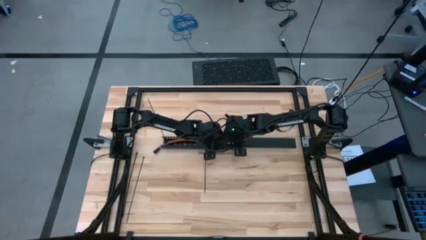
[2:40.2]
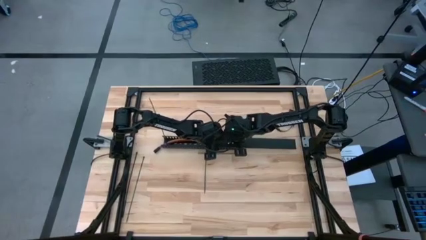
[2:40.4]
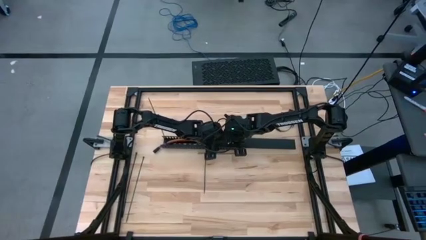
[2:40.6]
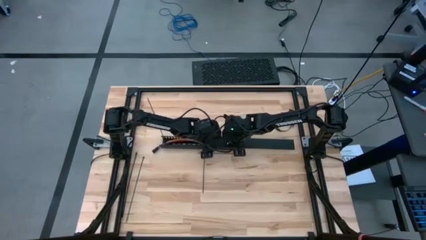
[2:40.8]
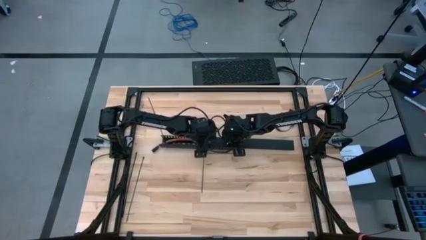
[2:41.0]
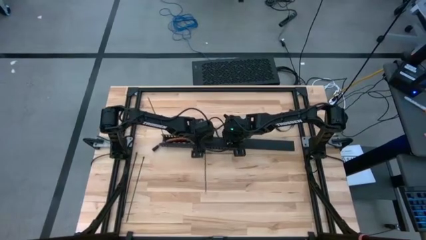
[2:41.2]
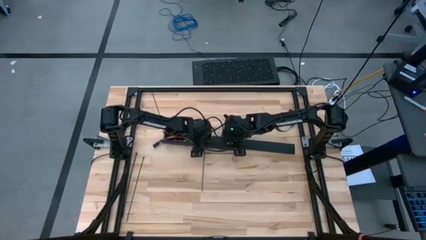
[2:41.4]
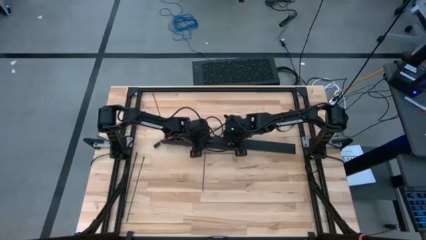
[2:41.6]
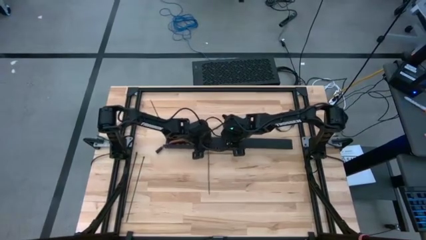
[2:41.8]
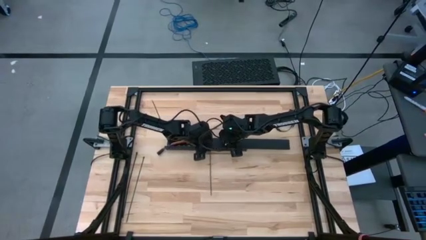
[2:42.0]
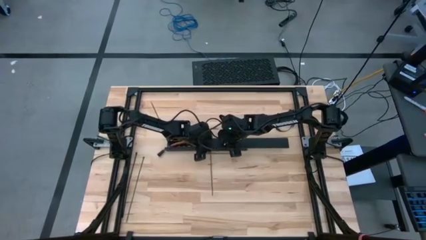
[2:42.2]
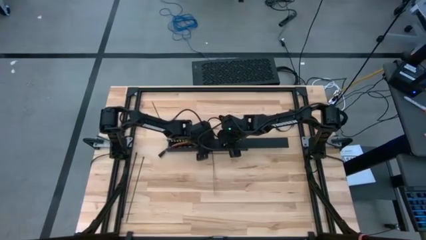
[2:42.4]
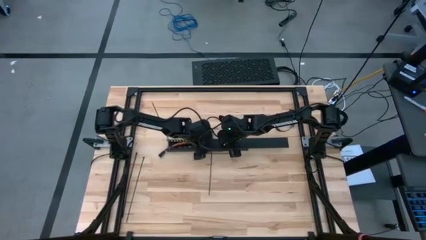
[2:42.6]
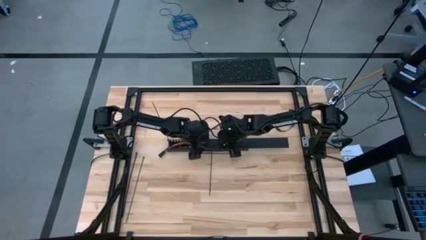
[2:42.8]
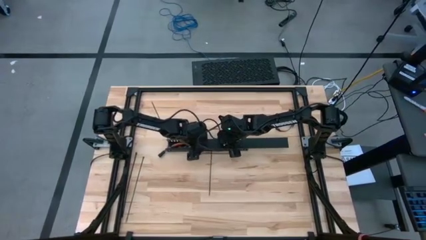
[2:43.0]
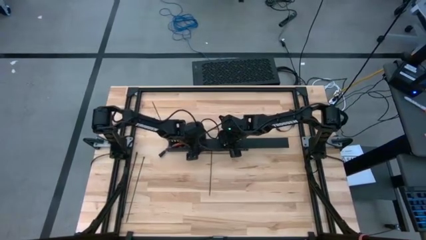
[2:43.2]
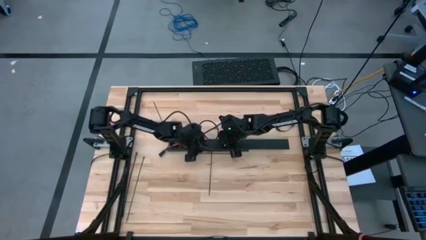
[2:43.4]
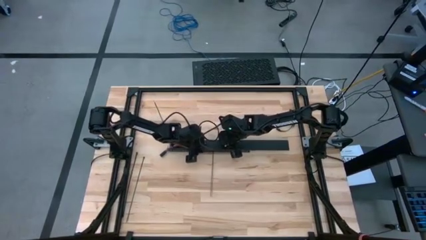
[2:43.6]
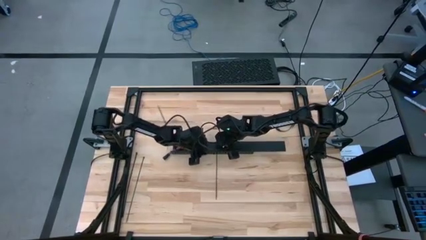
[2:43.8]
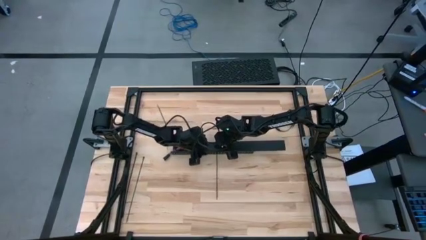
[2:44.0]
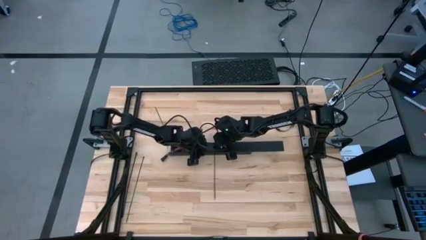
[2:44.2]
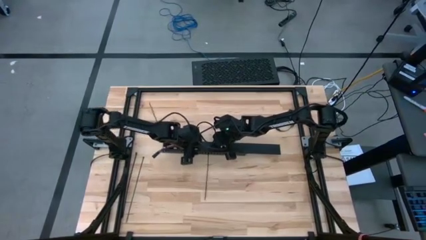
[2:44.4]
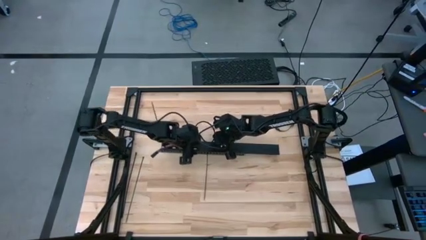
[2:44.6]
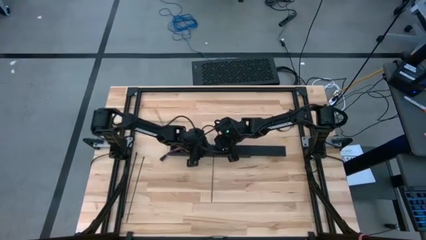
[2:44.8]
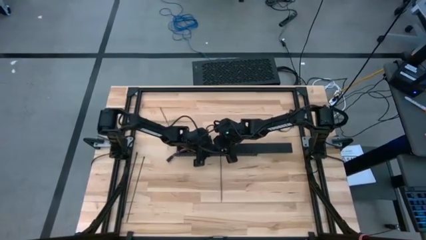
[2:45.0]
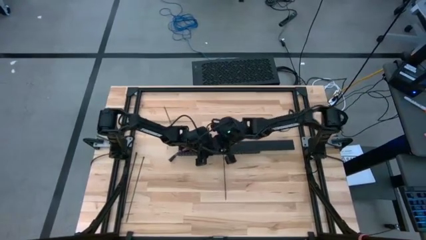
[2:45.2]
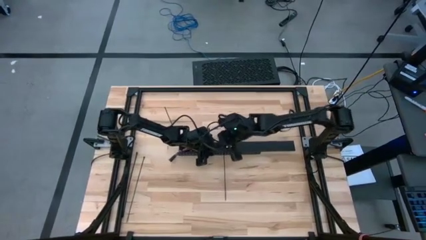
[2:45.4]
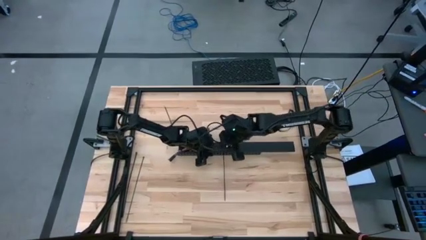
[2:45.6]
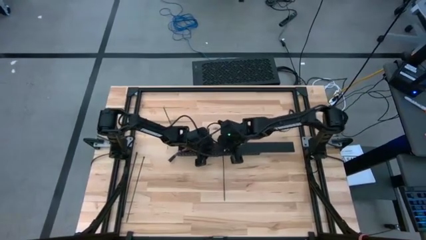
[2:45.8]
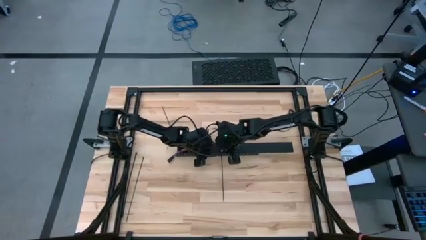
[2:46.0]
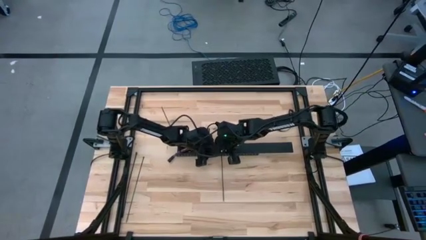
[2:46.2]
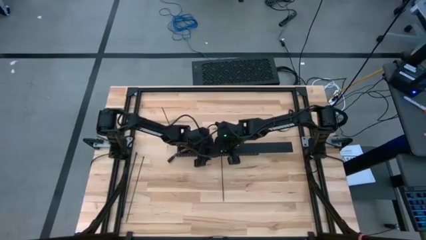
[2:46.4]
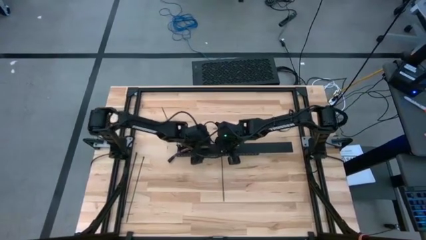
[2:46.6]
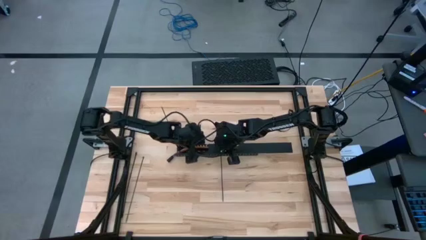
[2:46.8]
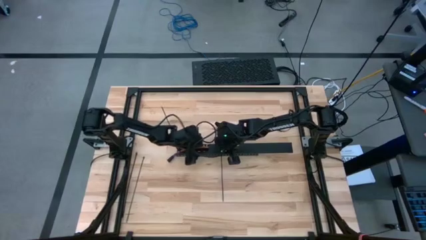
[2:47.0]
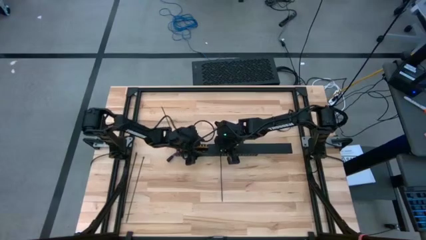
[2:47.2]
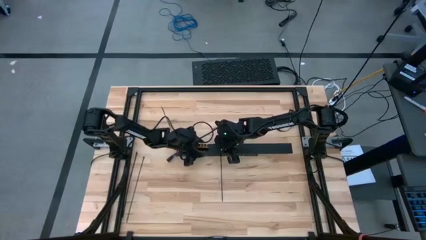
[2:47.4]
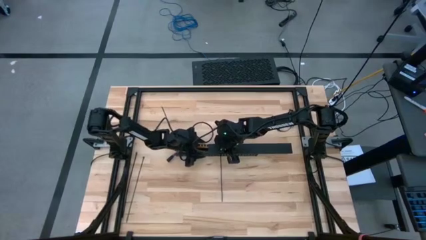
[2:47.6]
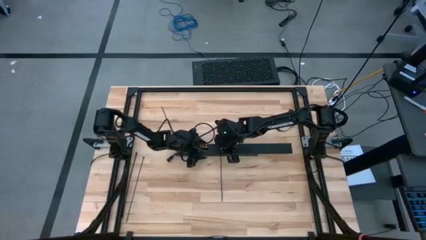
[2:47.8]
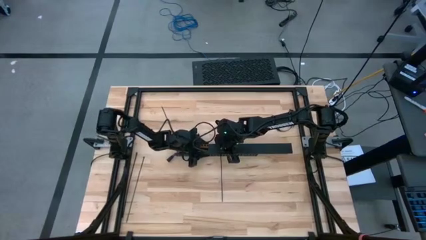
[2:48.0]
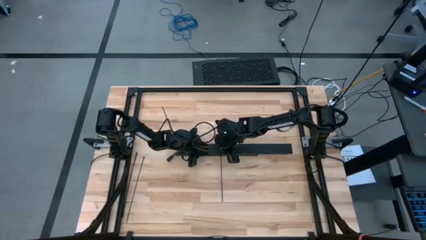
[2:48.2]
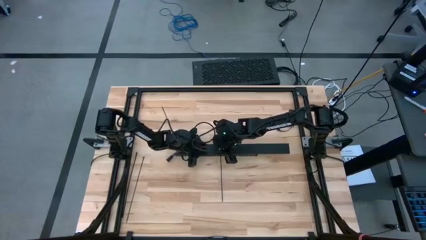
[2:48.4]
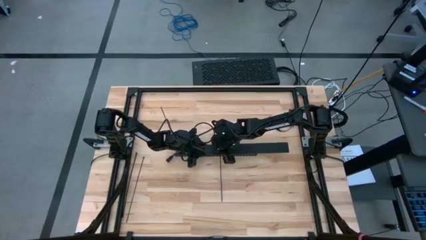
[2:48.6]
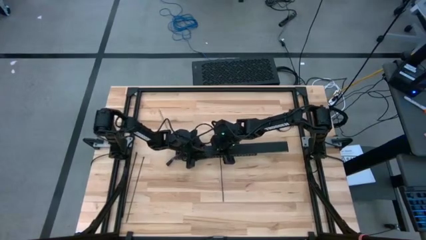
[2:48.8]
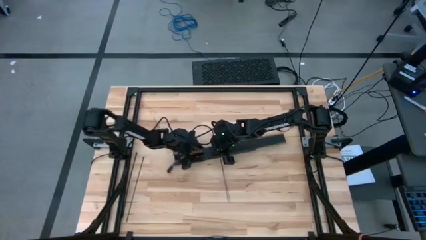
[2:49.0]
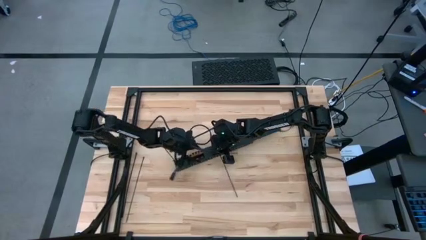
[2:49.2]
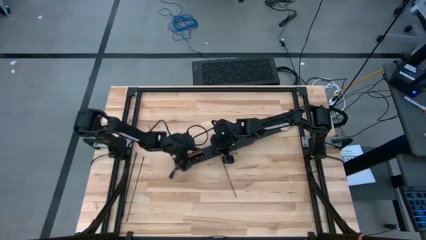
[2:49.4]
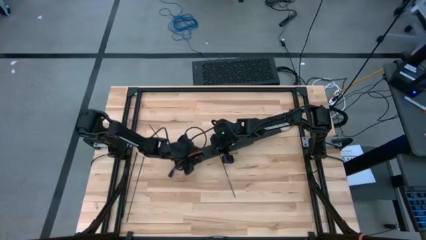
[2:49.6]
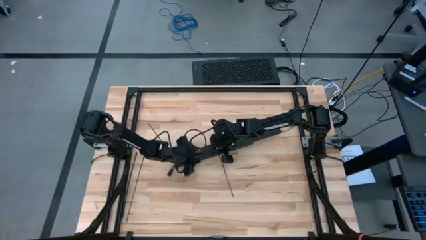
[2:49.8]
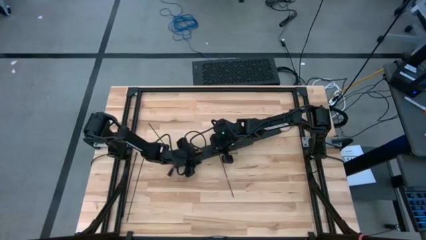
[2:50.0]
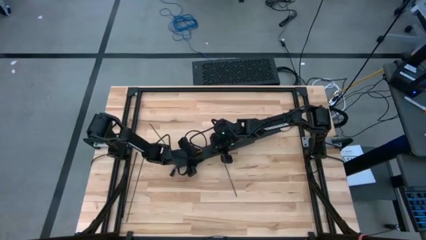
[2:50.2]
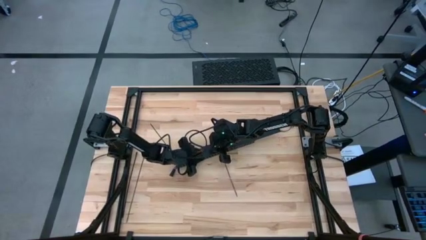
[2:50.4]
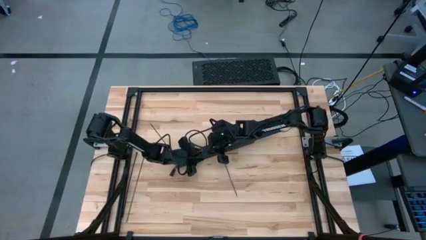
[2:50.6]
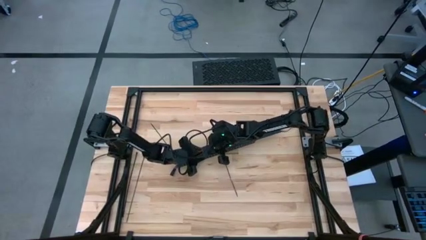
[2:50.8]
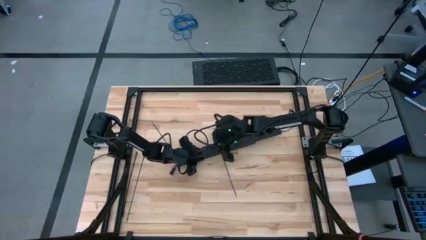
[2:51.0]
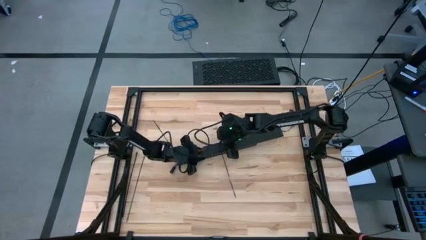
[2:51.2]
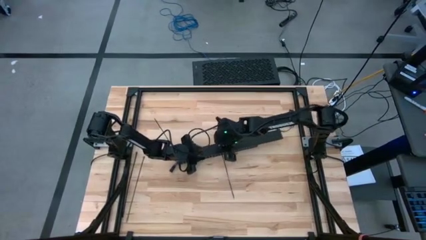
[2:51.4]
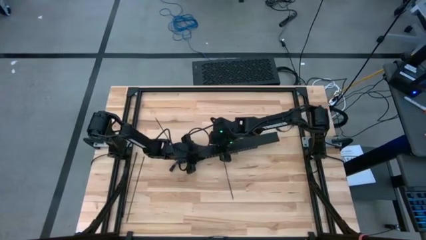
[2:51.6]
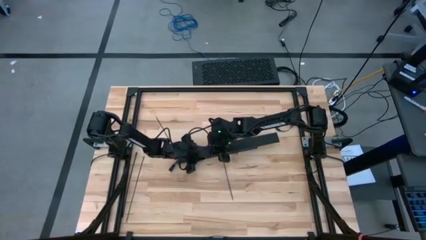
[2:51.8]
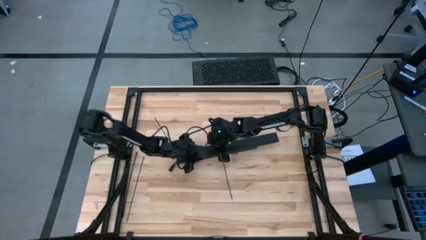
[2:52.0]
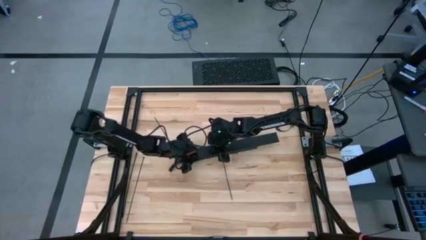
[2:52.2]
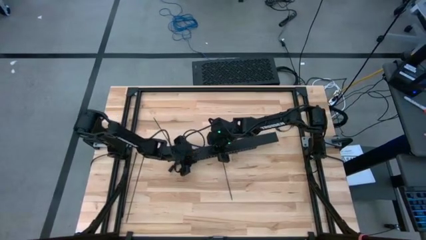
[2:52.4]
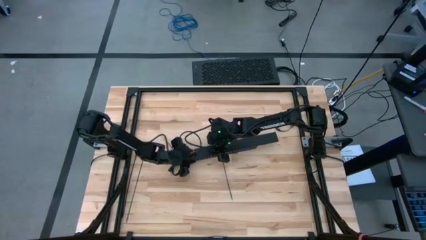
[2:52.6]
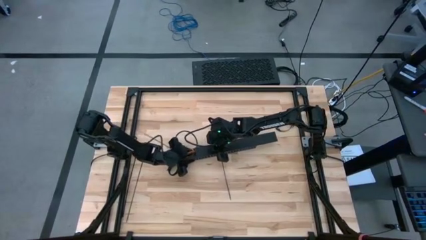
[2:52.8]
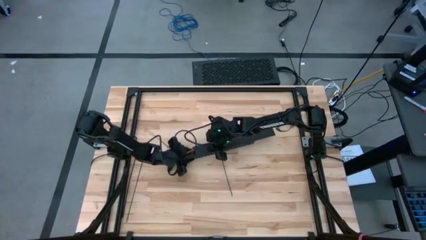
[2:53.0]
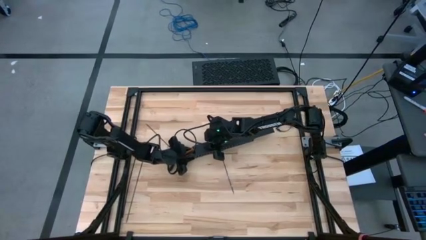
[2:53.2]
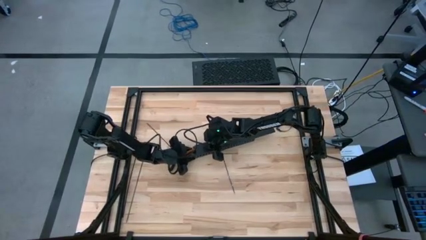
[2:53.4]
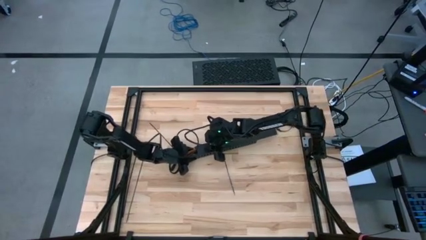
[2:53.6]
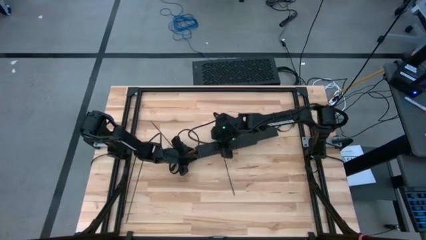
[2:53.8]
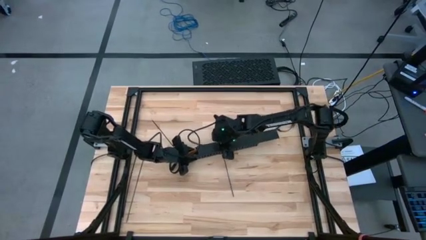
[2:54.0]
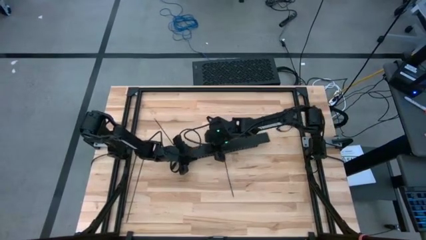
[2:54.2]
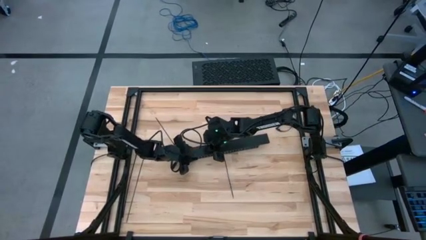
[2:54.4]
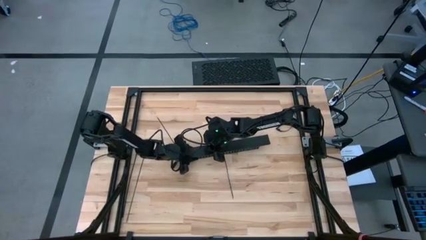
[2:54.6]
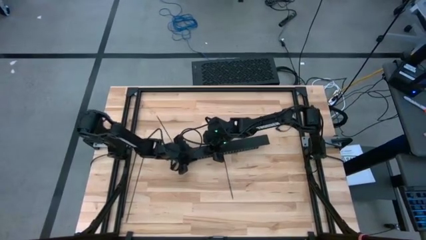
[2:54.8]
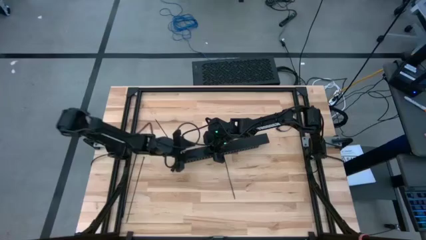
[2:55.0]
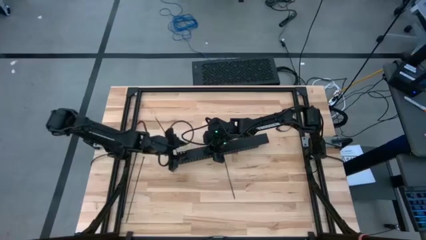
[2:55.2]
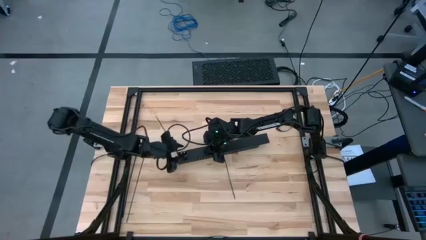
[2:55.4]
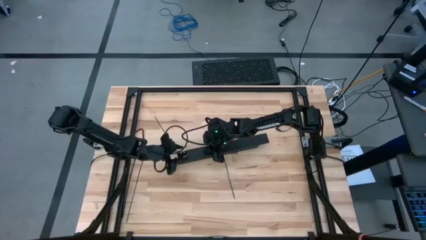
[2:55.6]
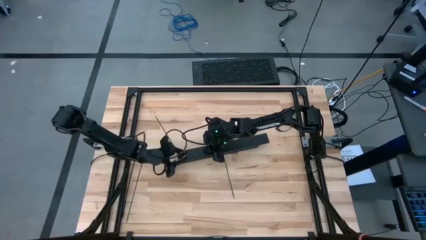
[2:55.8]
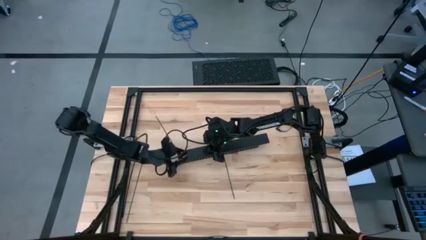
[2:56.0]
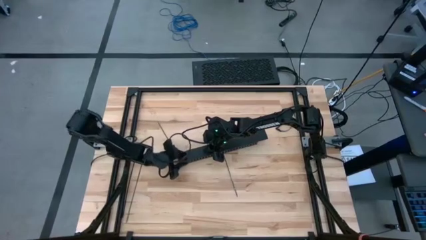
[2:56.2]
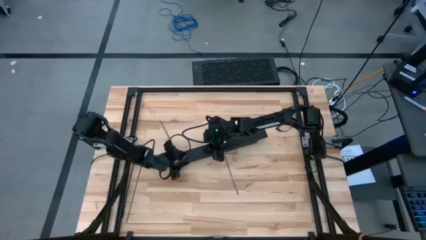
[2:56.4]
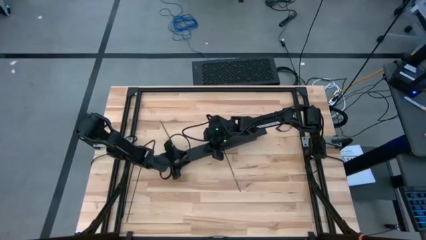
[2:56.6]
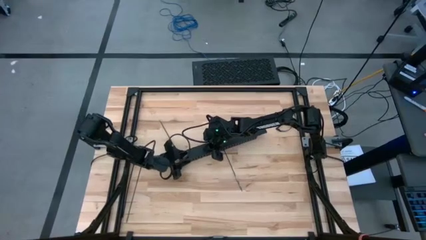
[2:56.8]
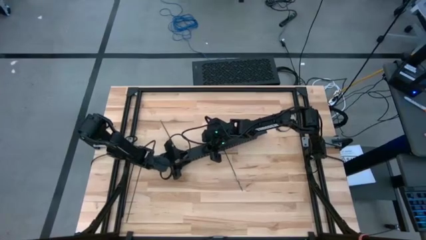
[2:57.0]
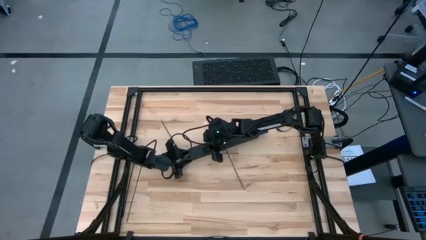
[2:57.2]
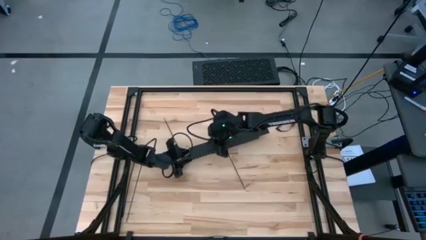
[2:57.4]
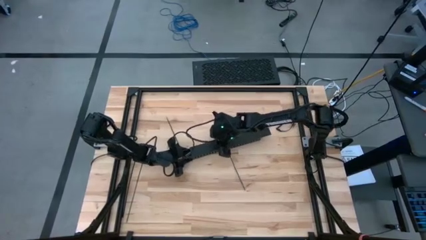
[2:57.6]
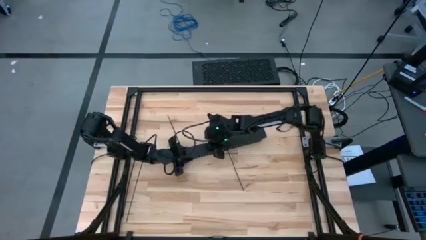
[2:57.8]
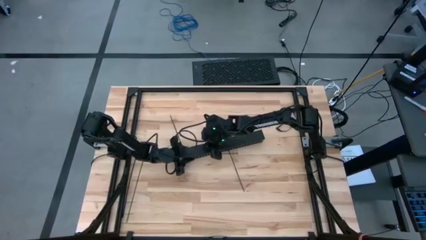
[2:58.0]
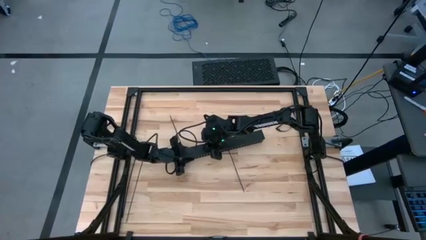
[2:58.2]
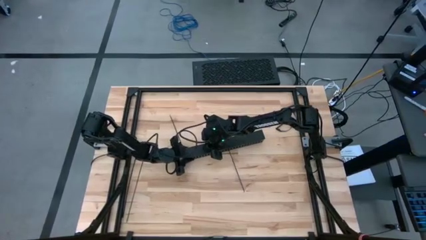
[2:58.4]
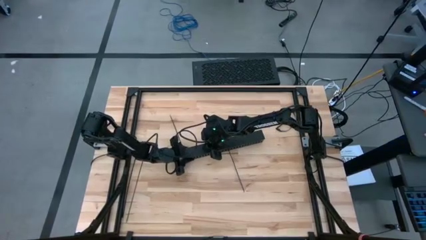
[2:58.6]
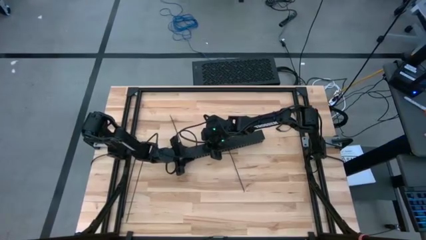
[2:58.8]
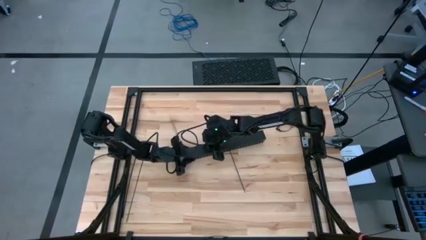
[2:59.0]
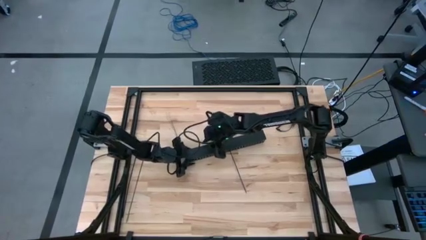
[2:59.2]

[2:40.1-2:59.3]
Task: Ziptie cables
Insert the cover on the black cable duct
